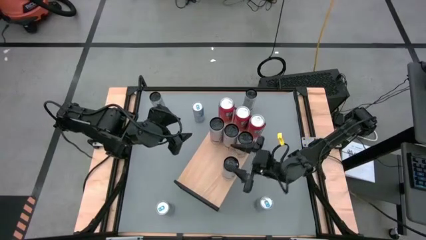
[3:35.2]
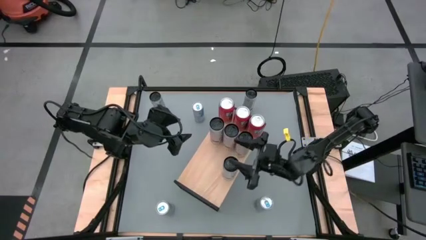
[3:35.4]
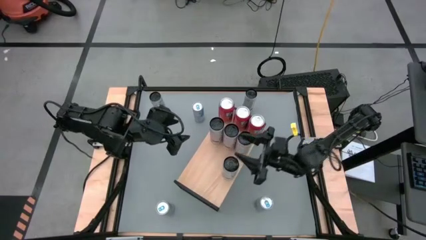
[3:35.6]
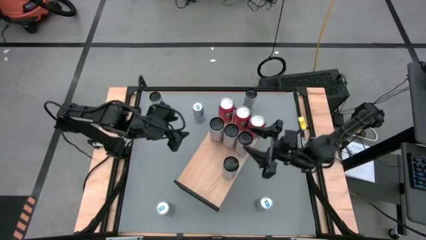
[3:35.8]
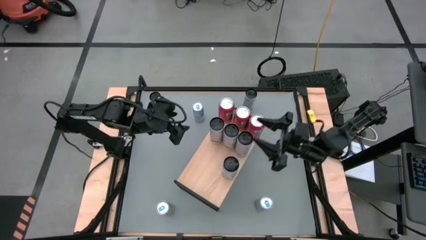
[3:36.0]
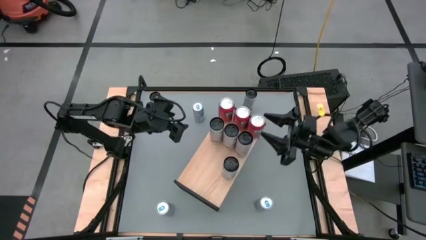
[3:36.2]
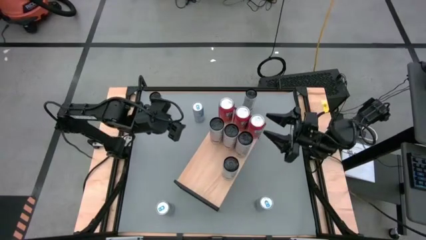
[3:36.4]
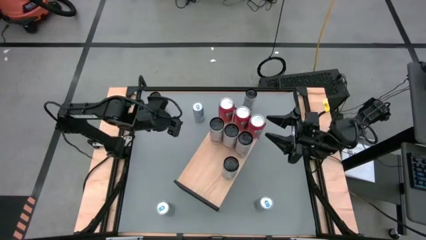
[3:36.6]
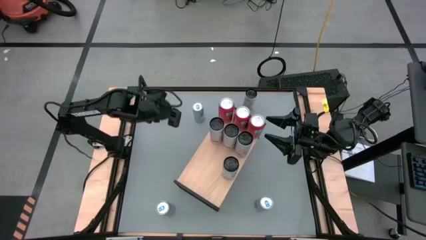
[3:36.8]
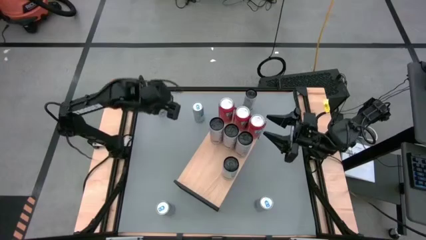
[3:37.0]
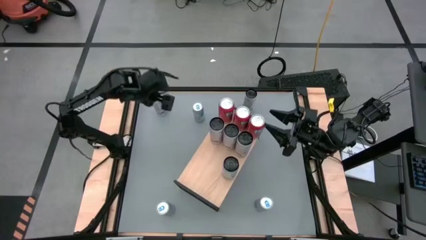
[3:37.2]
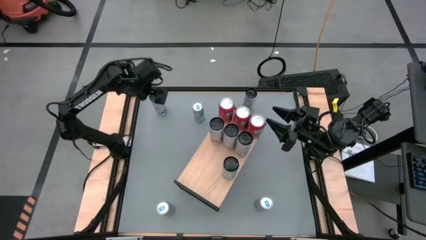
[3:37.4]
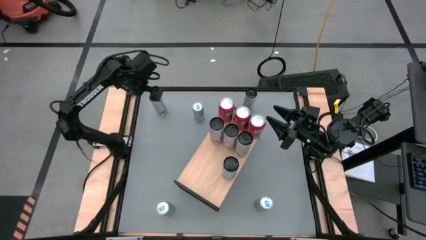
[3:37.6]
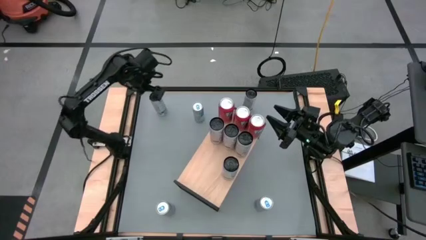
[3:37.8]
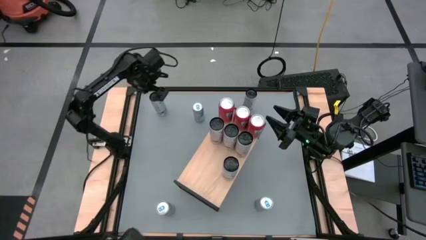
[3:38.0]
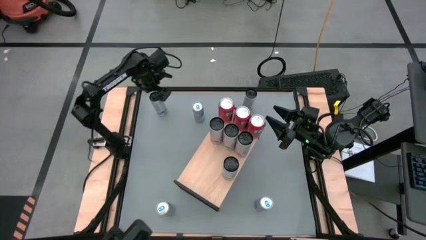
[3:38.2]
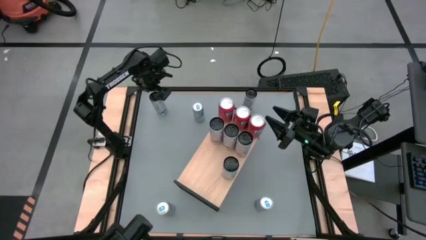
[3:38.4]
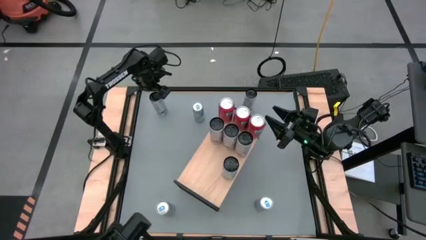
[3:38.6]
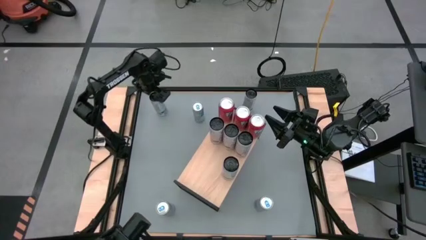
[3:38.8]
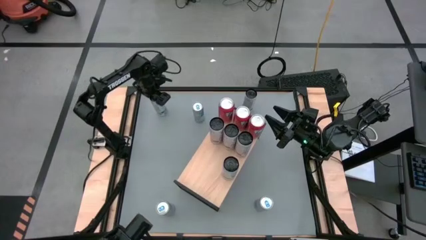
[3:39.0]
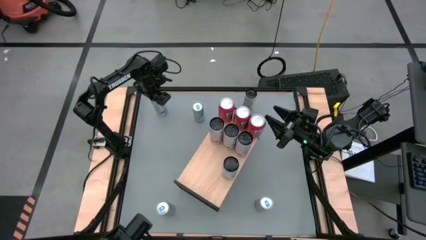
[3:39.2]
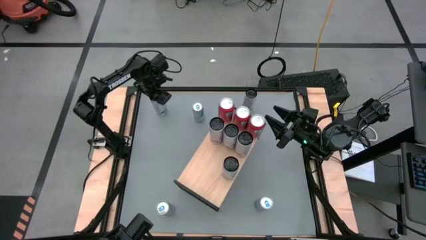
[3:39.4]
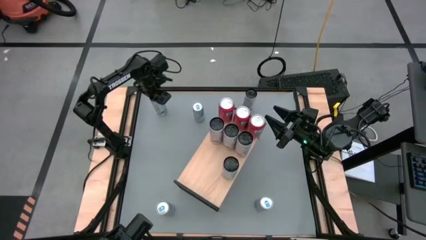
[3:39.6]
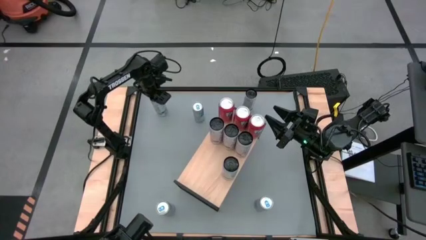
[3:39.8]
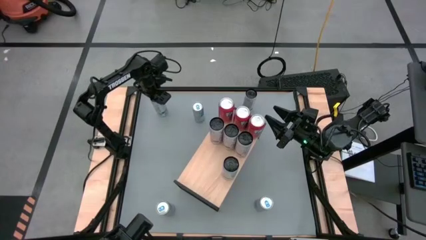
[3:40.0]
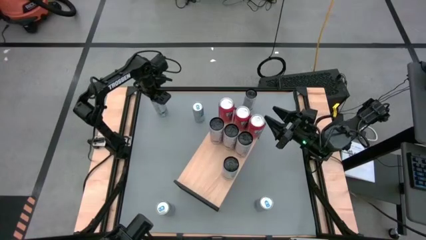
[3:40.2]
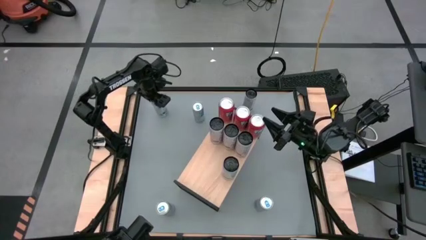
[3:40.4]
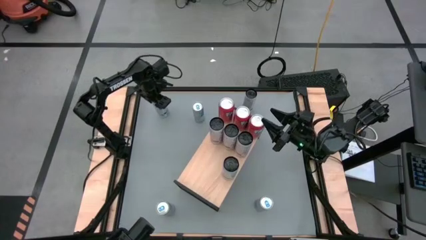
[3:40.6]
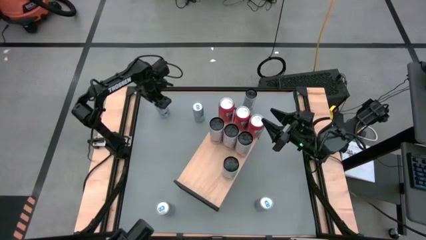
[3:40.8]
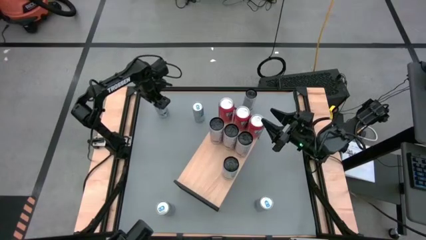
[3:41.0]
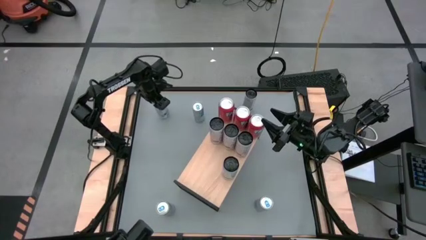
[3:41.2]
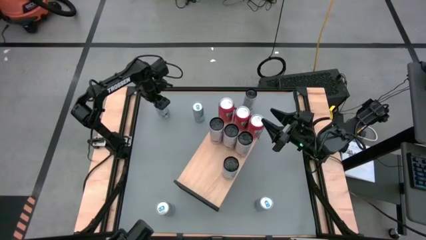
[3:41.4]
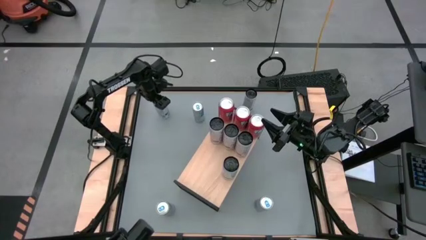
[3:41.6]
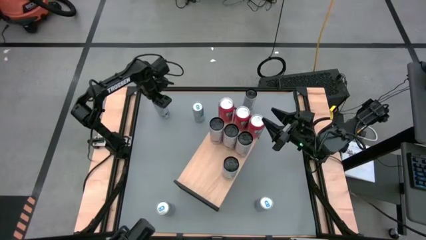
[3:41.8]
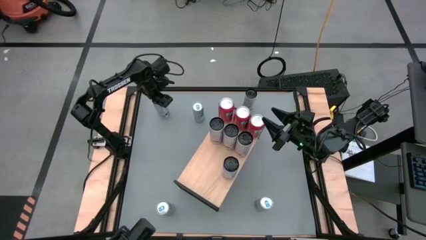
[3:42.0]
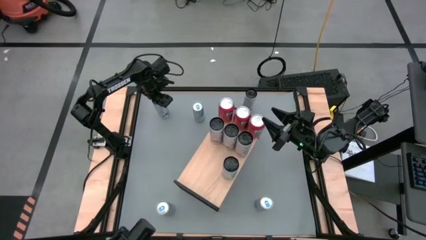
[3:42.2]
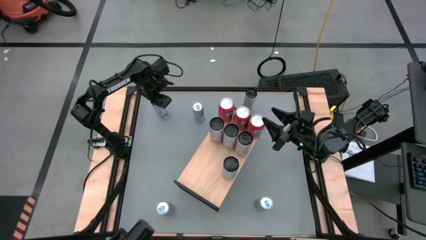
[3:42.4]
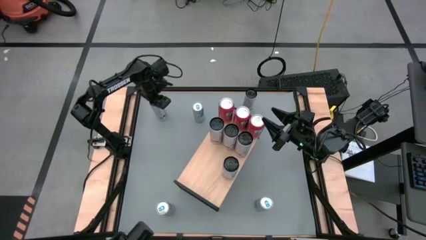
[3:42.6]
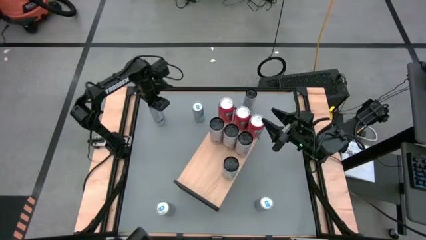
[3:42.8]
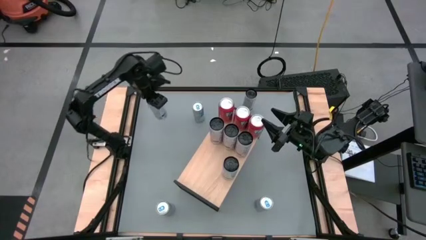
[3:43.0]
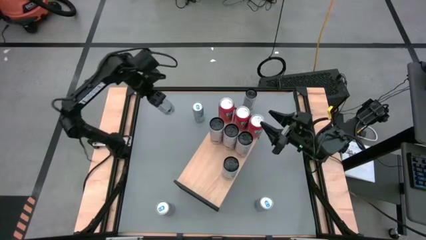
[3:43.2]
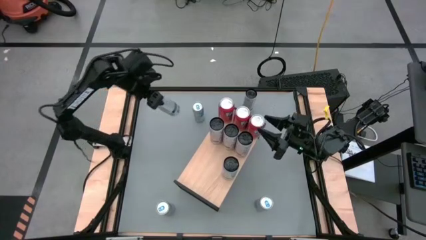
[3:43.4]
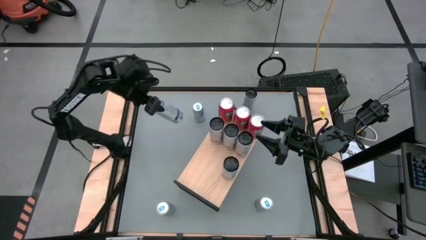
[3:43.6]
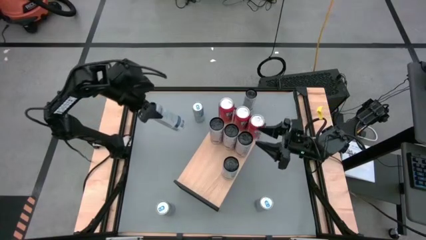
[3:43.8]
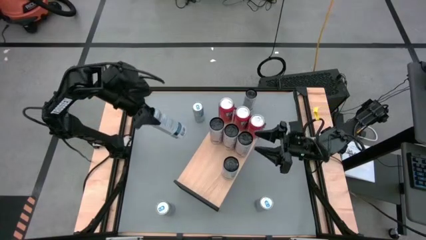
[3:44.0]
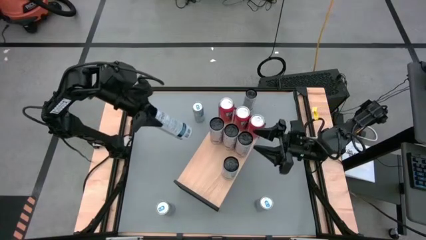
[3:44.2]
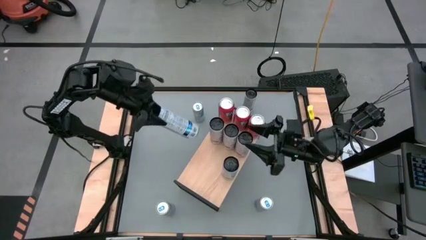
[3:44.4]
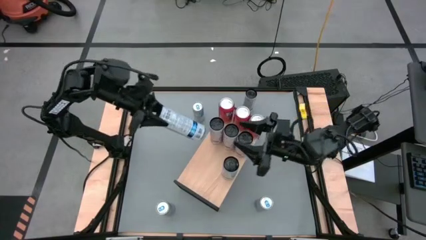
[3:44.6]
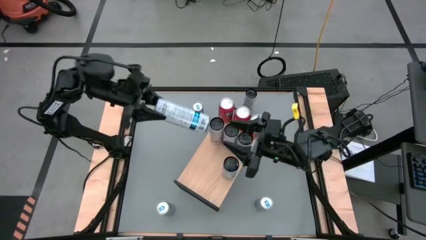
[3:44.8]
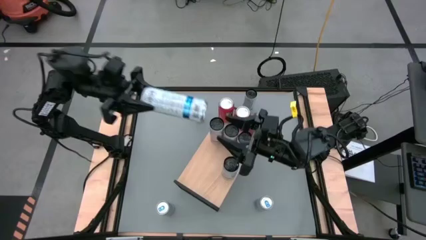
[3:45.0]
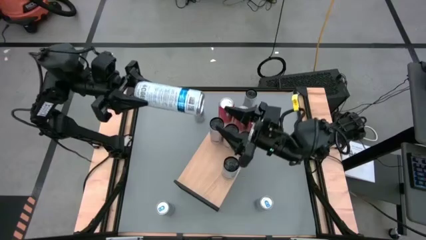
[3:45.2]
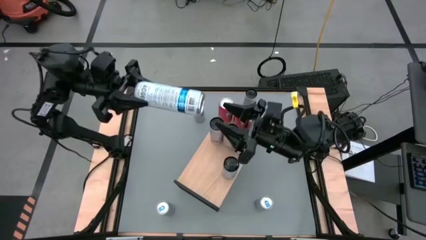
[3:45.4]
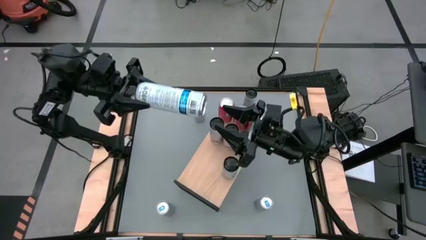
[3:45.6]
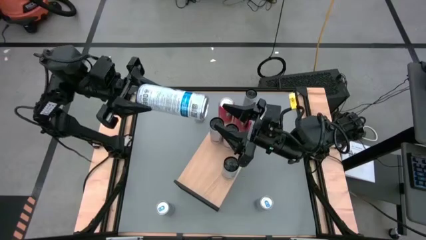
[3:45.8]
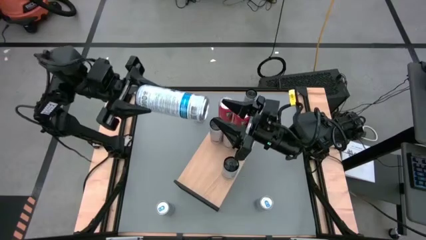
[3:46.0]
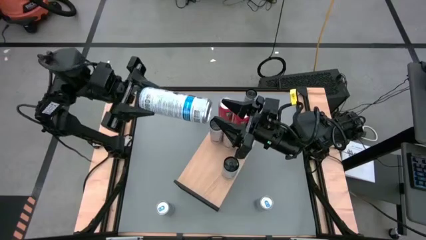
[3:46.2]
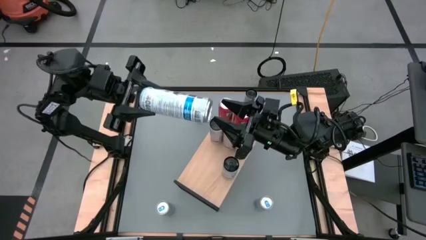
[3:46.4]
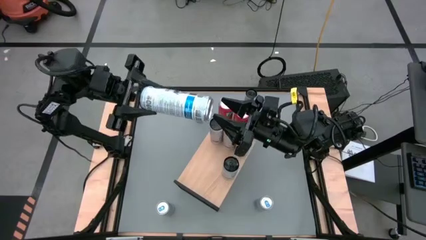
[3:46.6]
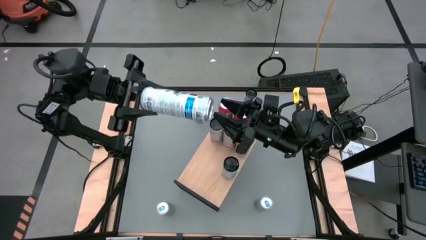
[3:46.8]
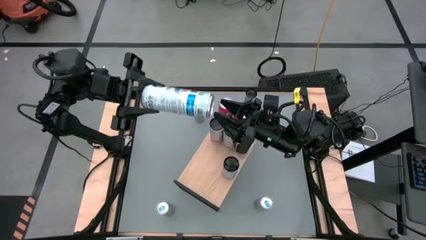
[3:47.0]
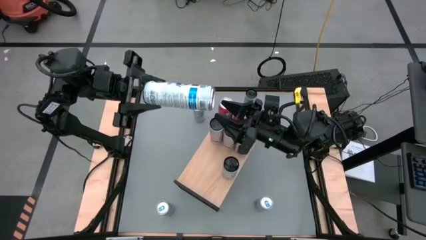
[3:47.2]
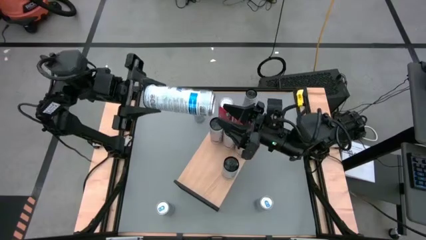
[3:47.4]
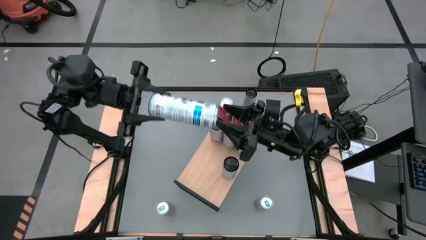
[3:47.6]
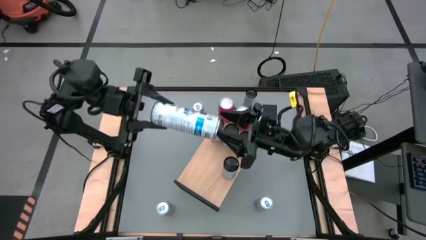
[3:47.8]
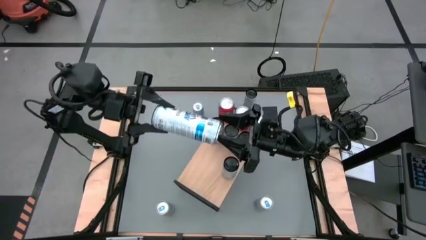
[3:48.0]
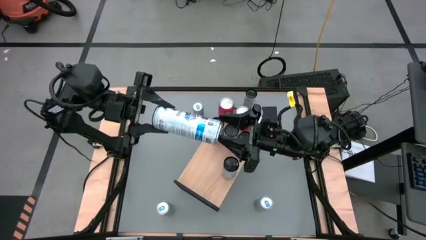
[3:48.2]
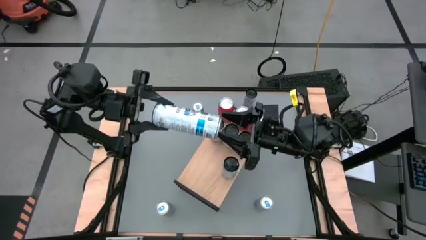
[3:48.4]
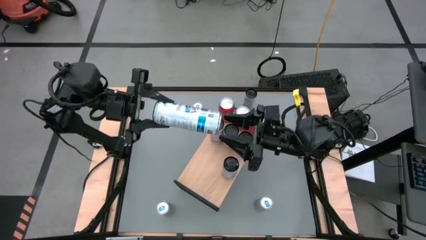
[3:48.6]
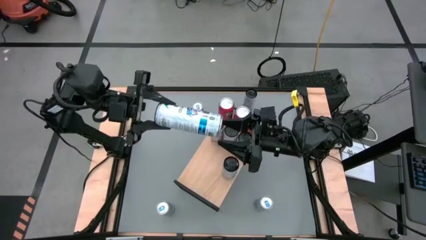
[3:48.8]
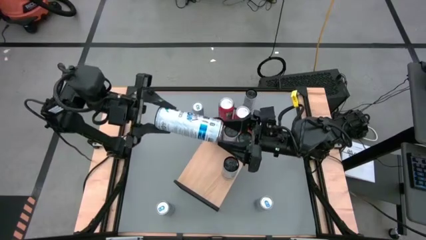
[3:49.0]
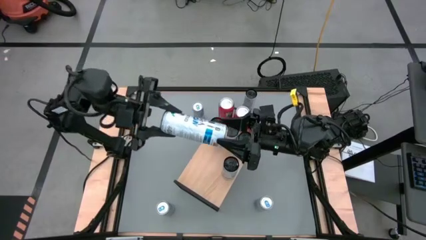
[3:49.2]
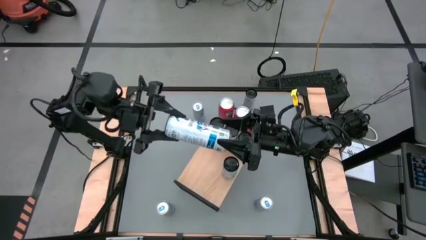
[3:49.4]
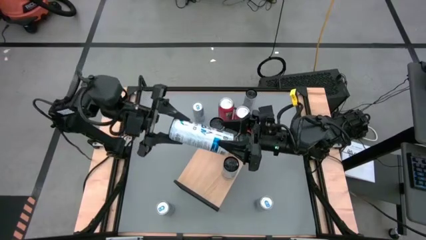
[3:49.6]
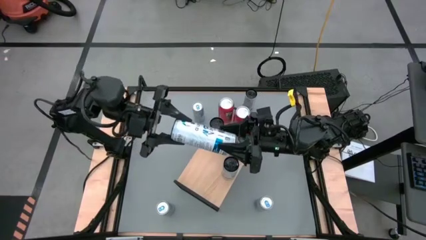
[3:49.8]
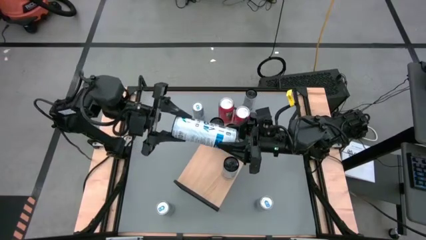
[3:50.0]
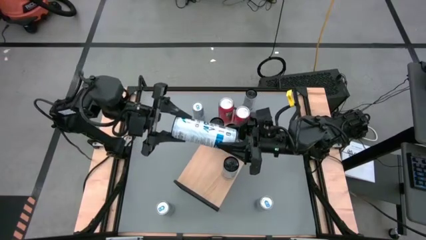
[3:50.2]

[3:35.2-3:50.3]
Task: Place canned beverage on shelf
Put the white blue soda can on the shelf aligned with the other white blue soda cans
